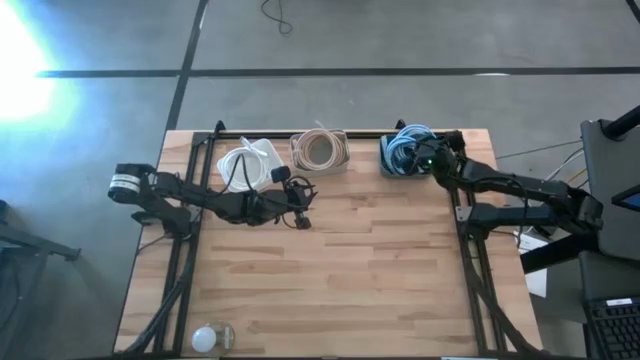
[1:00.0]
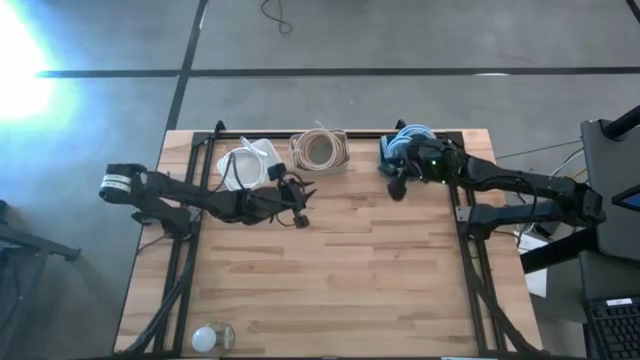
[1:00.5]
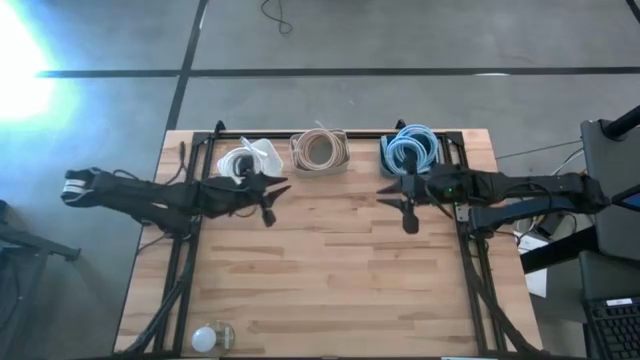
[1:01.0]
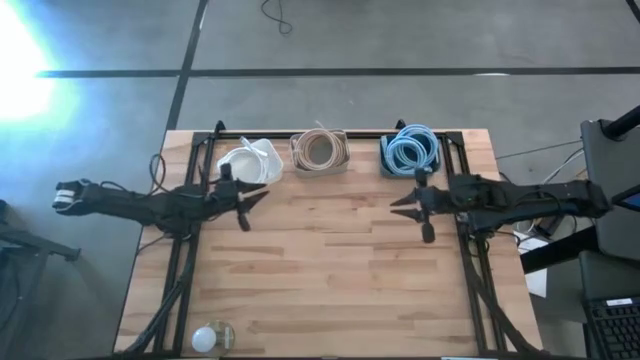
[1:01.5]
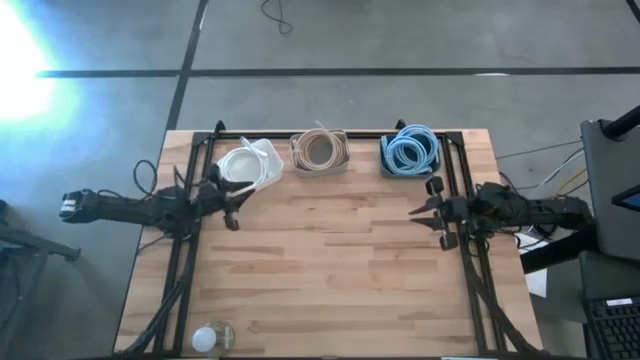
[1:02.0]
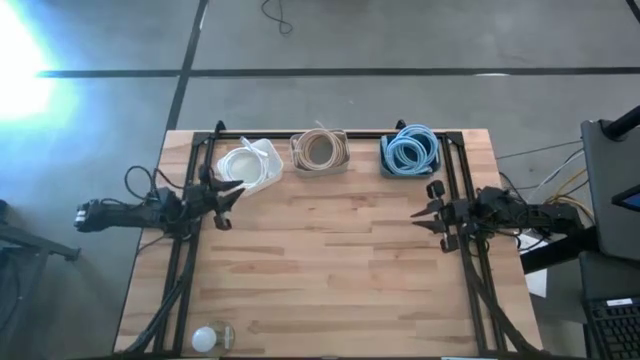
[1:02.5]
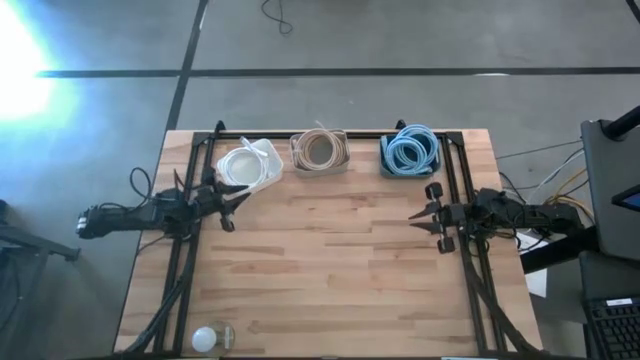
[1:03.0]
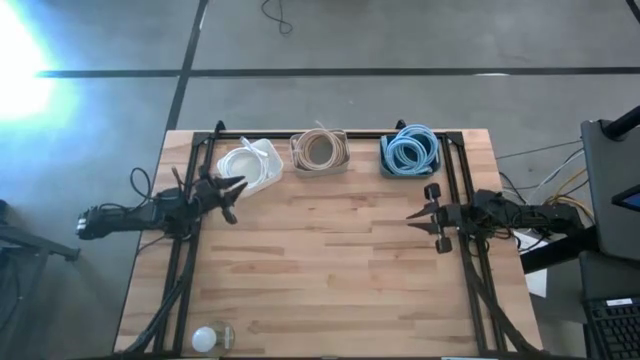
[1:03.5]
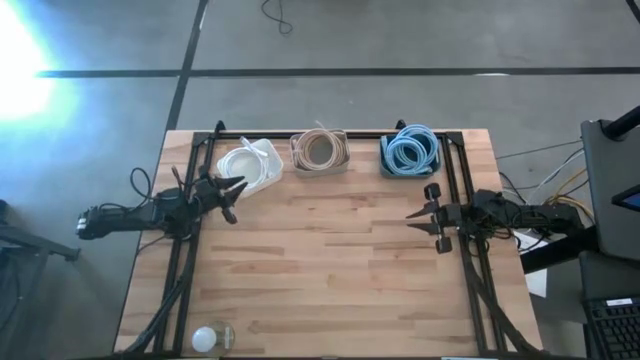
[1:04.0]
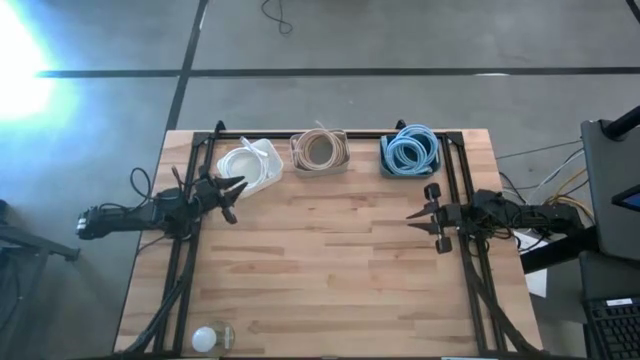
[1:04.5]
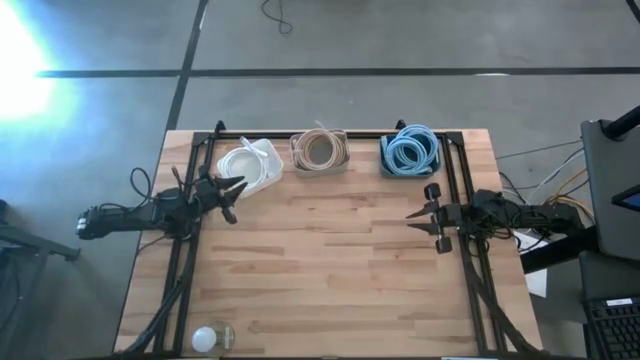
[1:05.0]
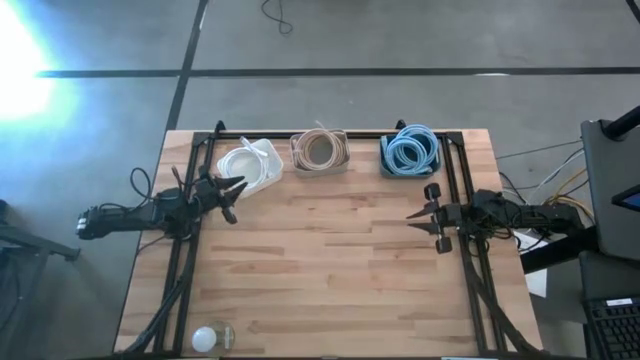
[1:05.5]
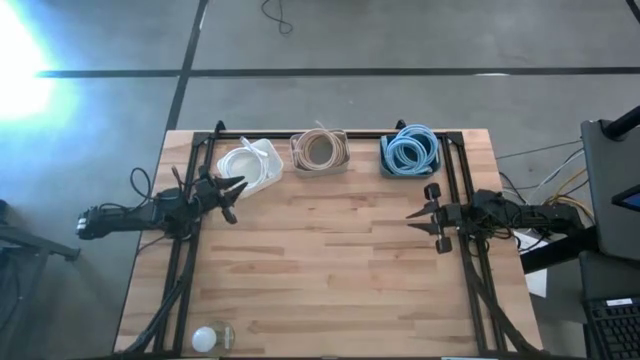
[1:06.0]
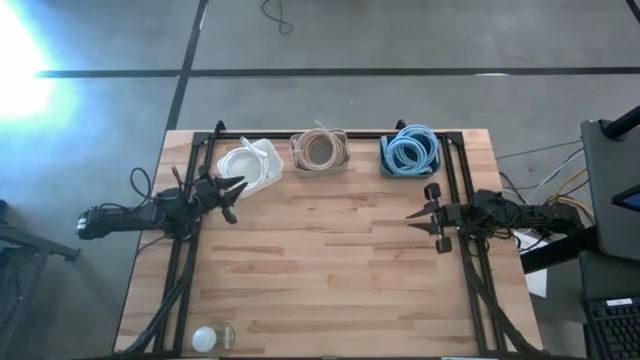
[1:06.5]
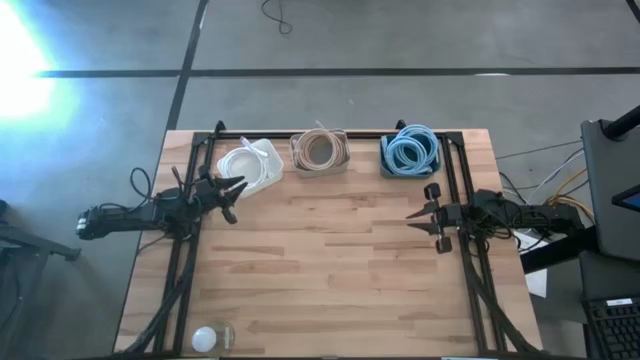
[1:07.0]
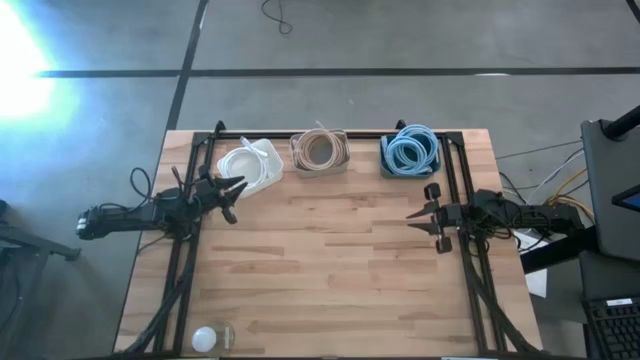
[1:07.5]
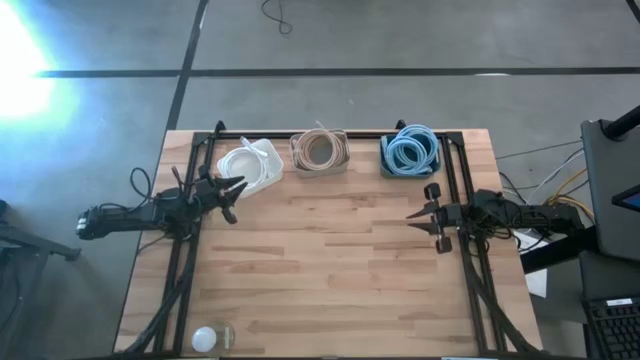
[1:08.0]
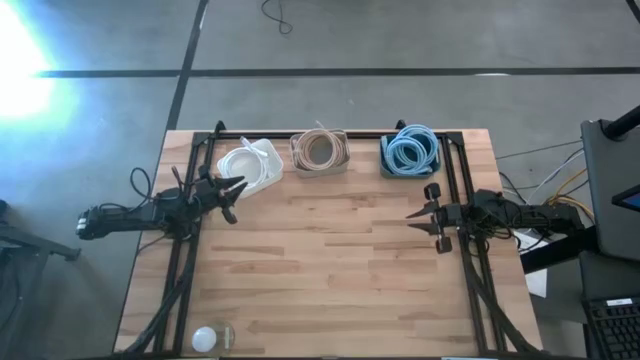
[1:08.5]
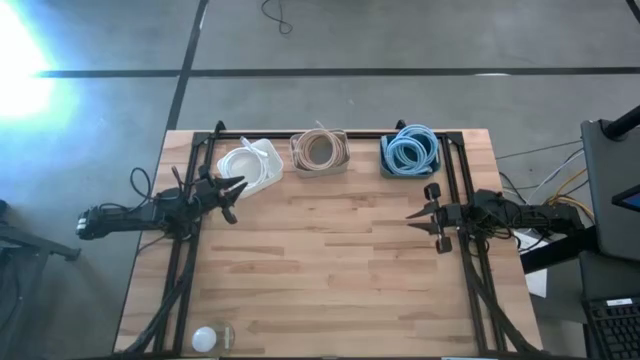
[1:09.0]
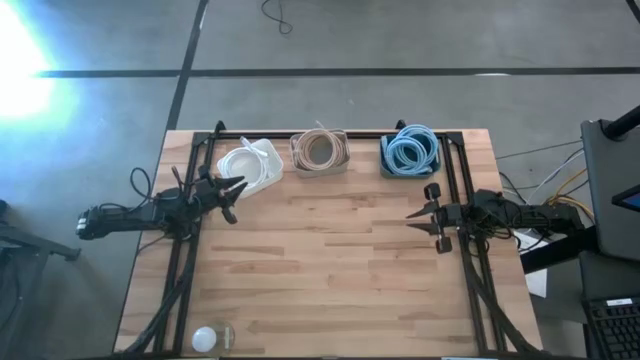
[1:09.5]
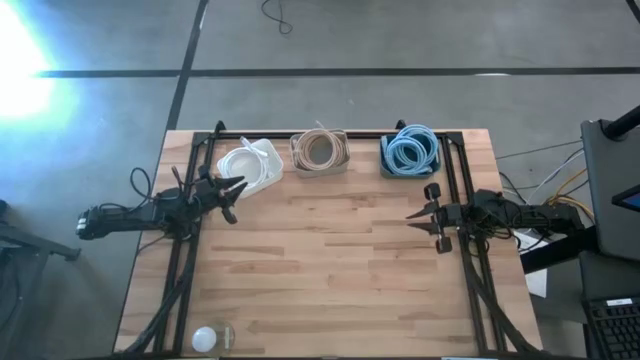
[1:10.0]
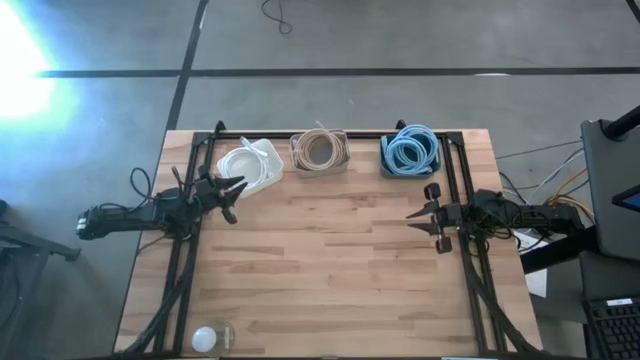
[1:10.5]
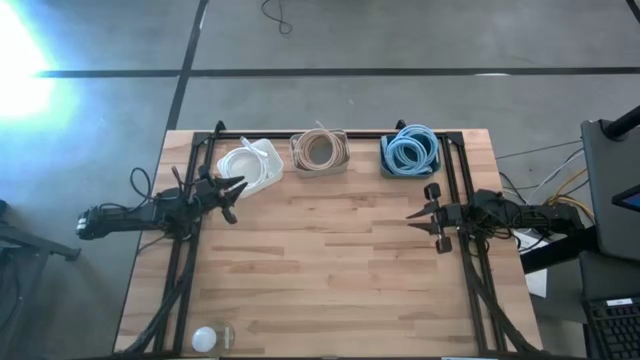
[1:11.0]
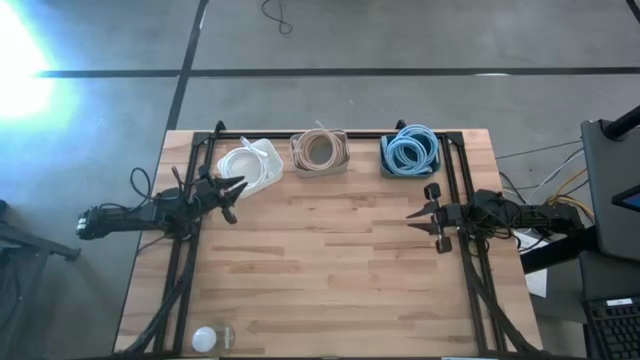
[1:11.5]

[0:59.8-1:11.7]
Task: Sort HDMI cables
Return to Home Position

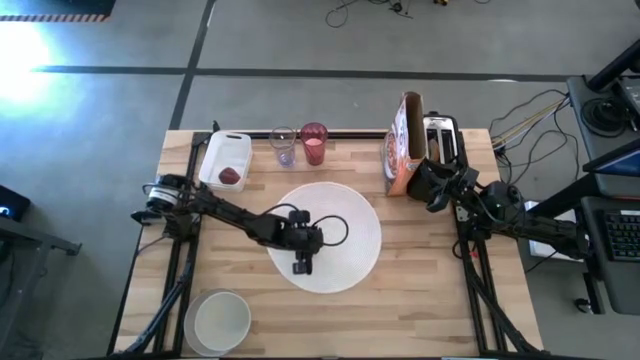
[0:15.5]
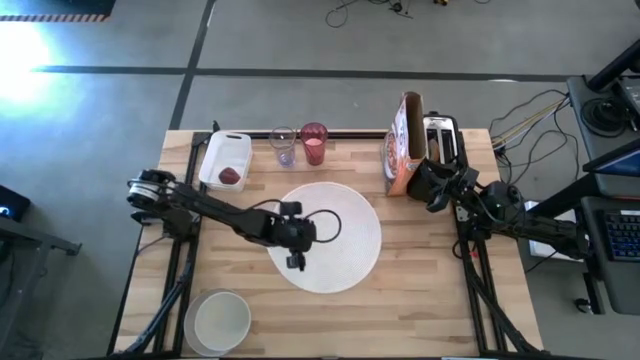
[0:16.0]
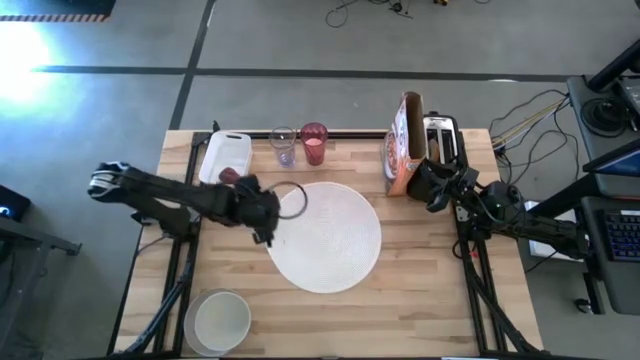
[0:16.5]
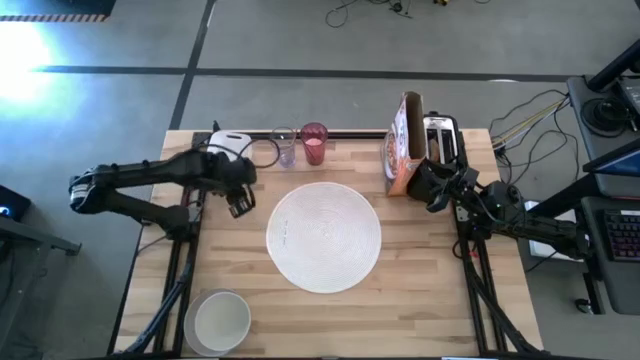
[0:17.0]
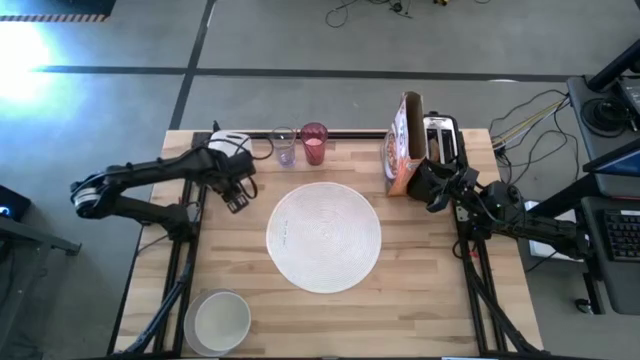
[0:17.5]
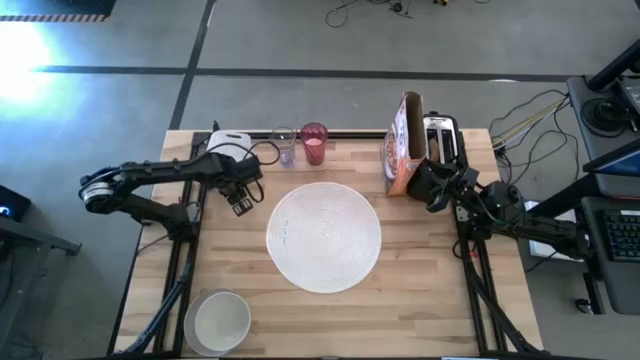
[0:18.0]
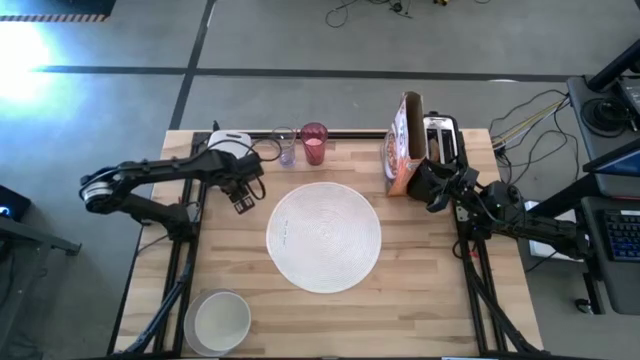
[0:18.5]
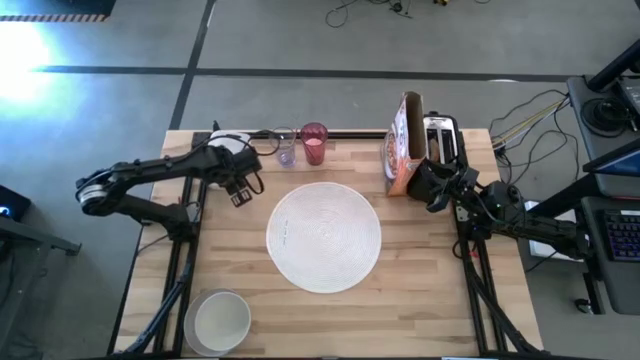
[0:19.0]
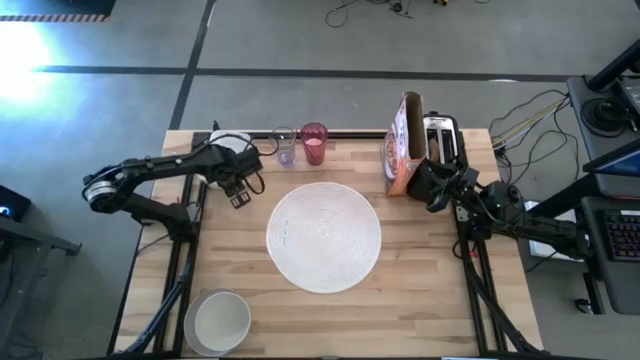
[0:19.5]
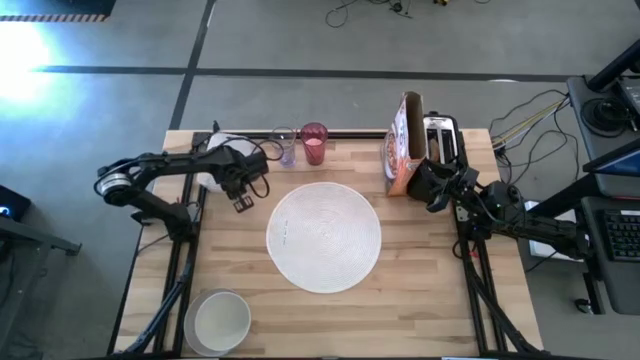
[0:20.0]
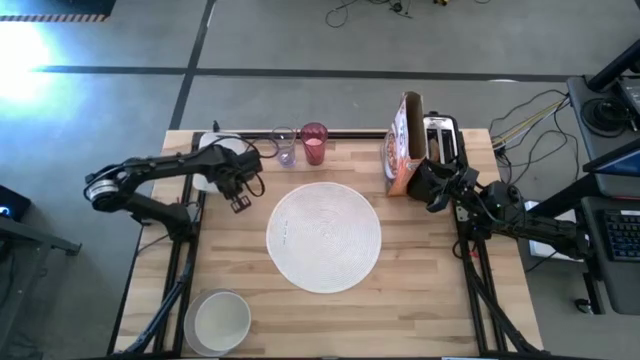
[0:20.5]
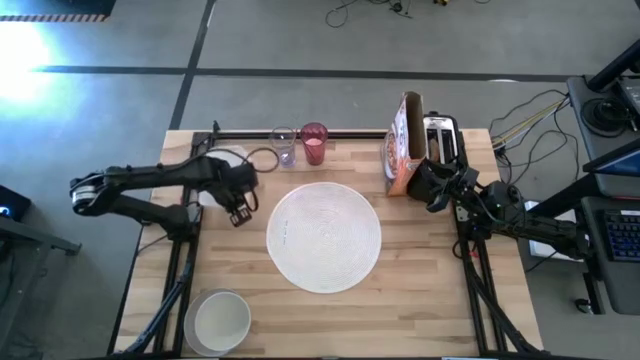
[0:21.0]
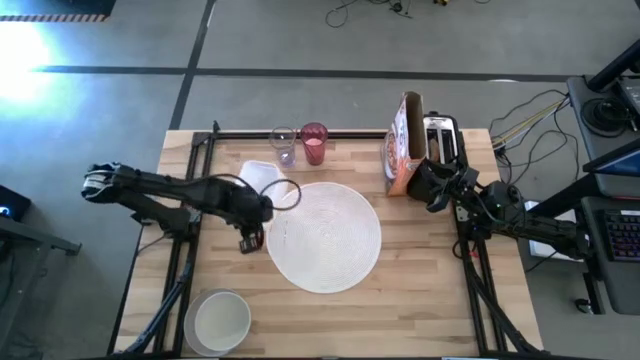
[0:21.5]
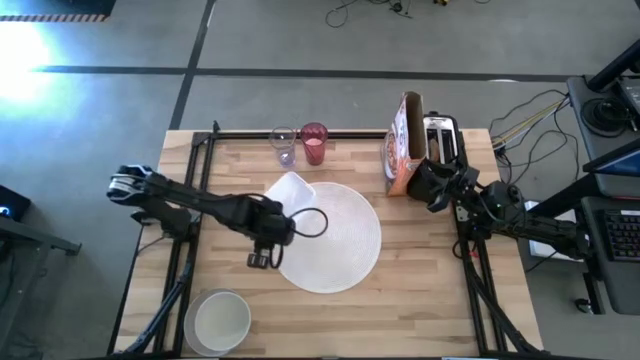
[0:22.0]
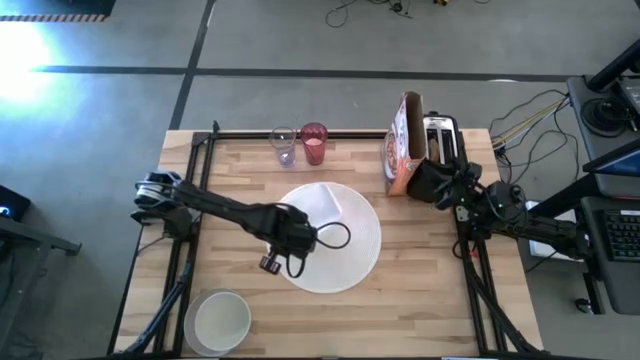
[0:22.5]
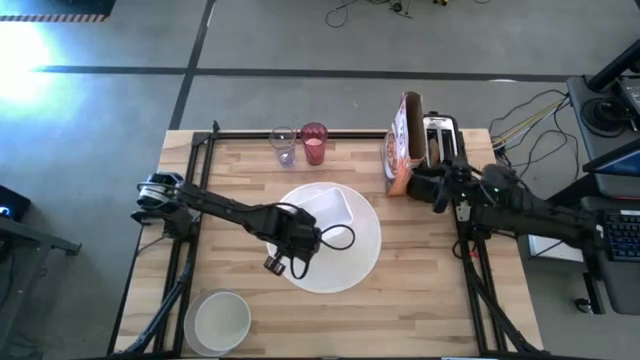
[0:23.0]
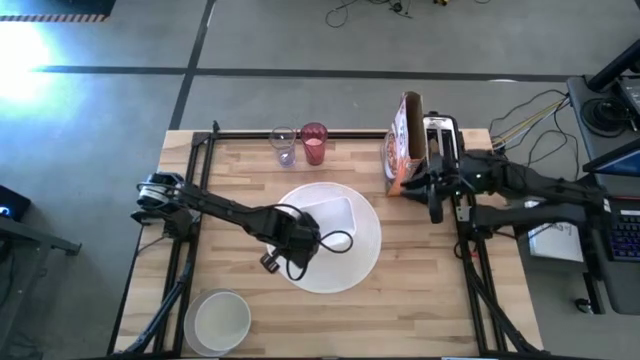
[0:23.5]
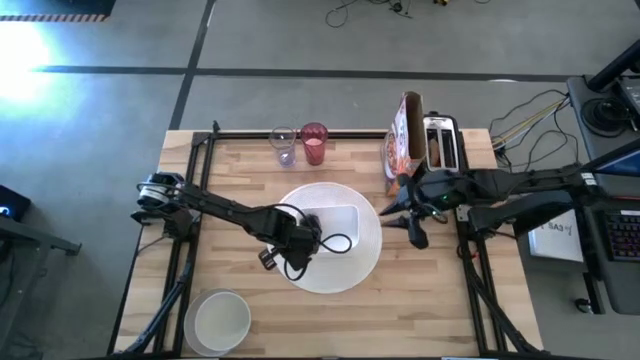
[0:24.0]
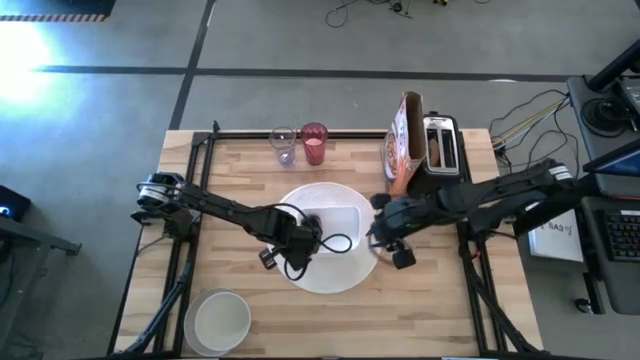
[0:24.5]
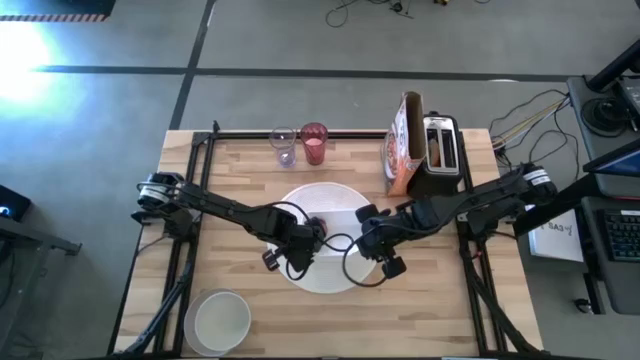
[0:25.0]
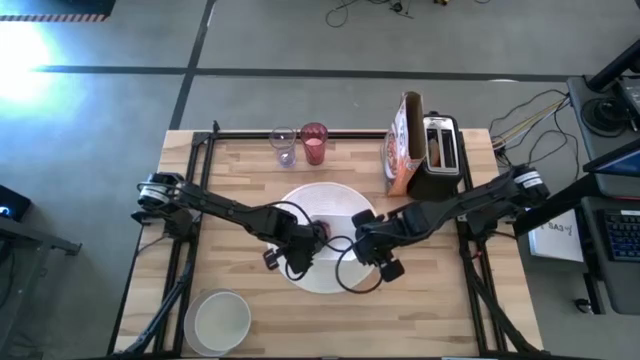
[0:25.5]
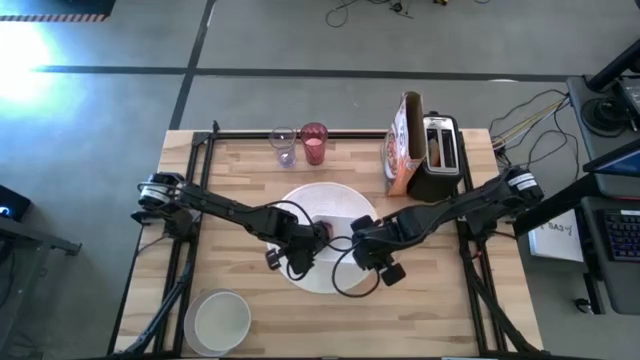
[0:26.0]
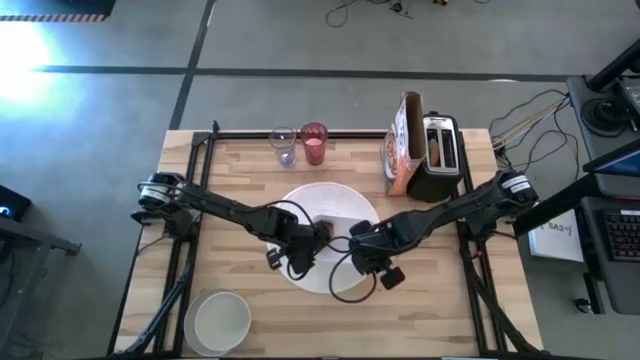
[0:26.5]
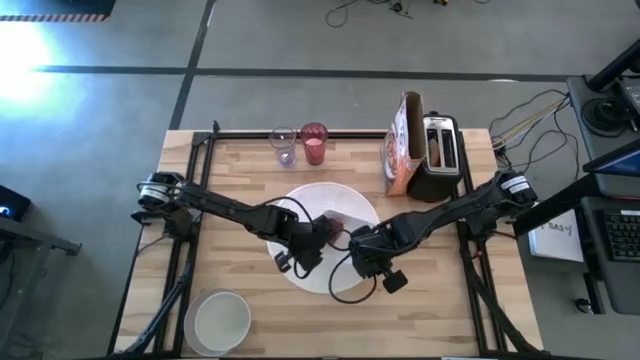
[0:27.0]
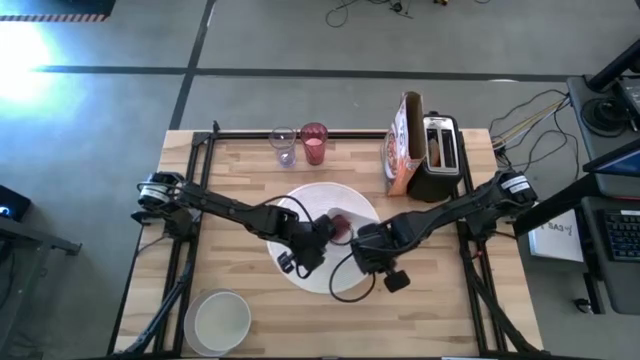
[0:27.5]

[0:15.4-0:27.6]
Task: Arrange a breakfast setting
Move the white bin to the bottom right of the table
